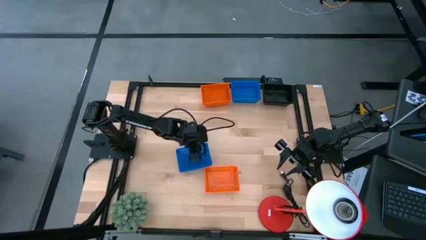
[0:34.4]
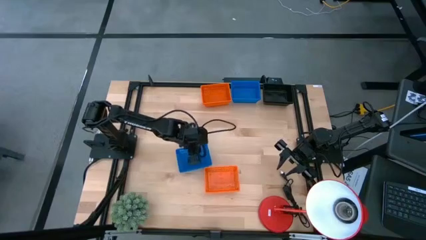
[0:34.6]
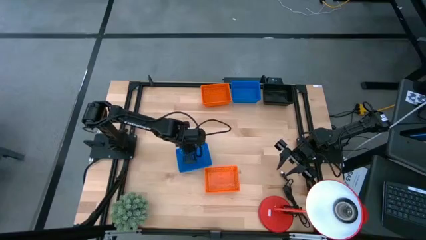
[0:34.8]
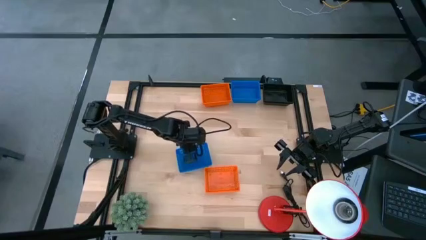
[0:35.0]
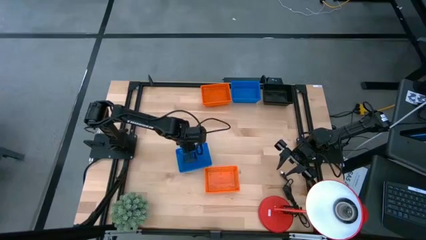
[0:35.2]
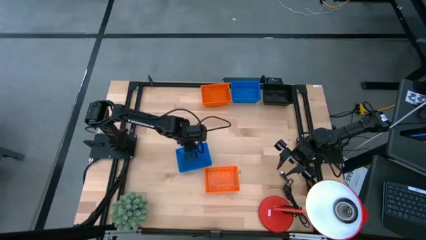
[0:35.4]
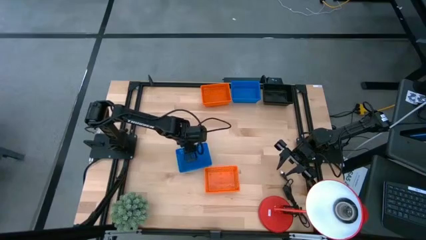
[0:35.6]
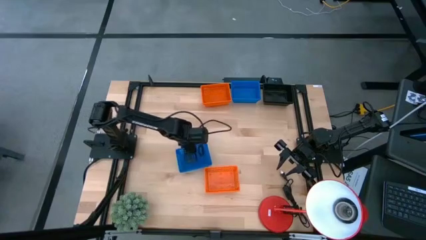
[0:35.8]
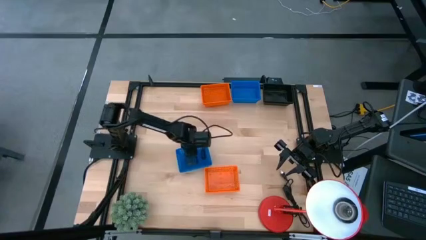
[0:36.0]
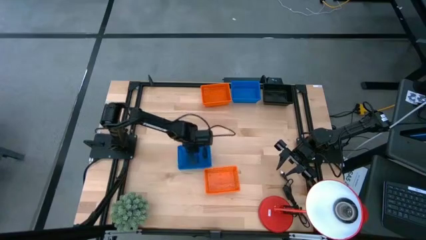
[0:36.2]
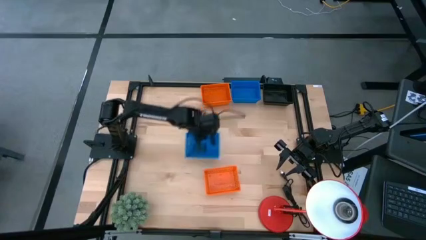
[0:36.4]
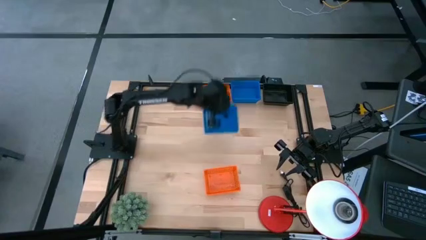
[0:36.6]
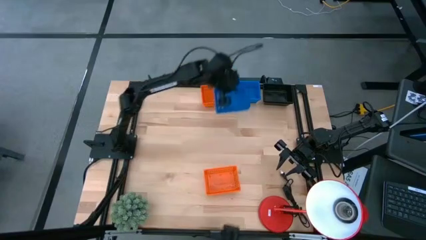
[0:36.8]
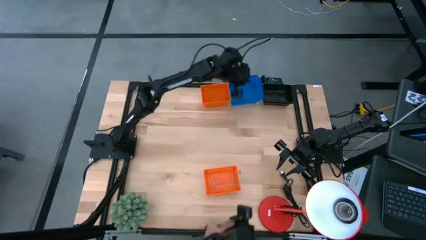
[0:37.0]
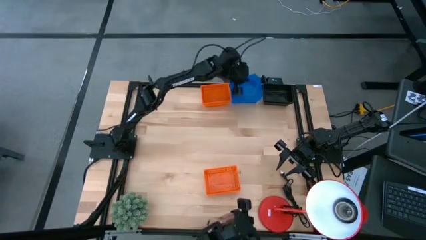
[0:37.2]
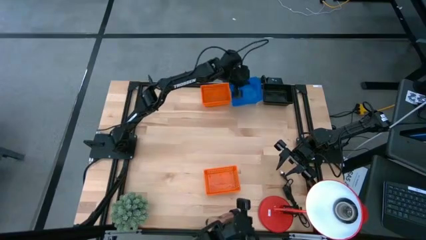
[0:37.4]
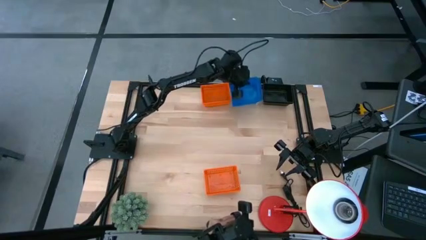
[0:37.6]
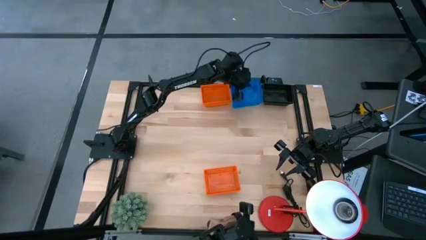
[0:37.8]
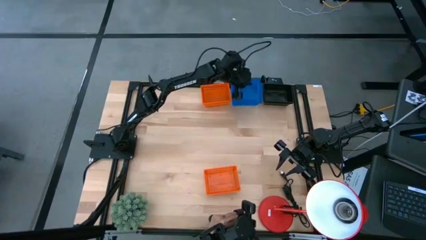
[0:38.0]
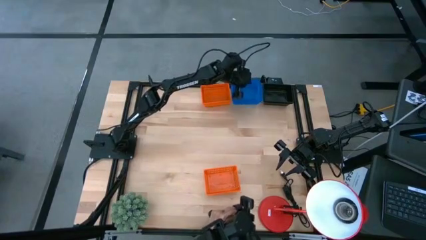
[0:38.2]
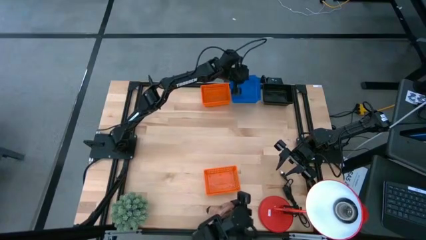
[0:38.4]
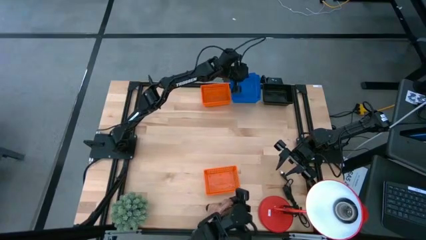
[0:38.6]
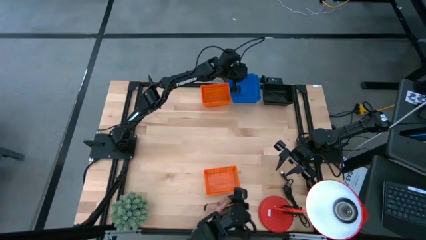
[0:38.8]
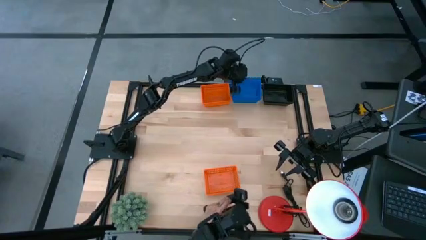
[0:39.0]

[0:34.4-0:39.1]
Stack the bottom blue bin on top of the top blue bin

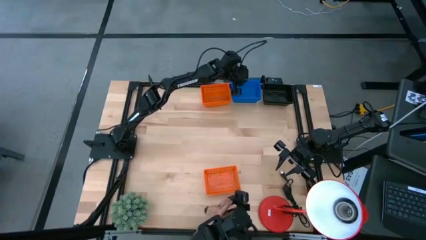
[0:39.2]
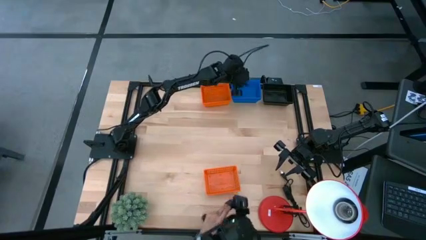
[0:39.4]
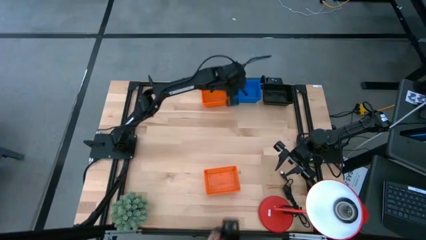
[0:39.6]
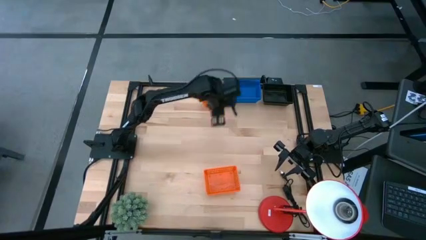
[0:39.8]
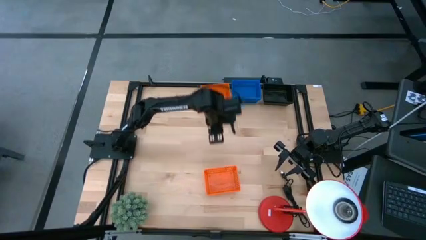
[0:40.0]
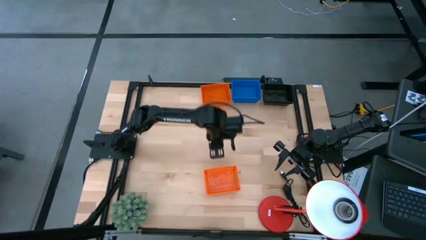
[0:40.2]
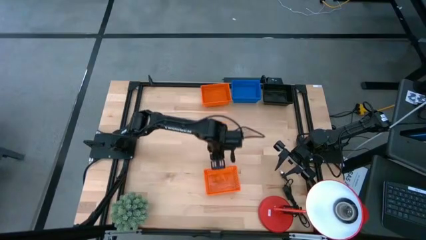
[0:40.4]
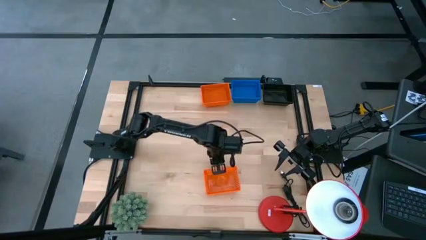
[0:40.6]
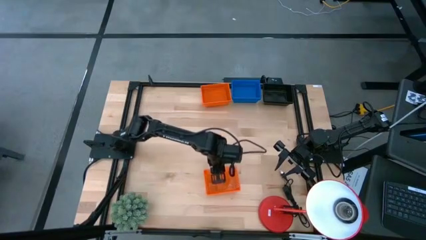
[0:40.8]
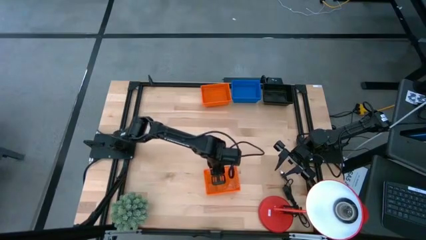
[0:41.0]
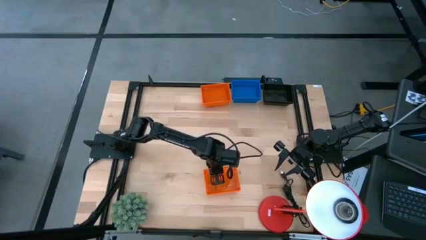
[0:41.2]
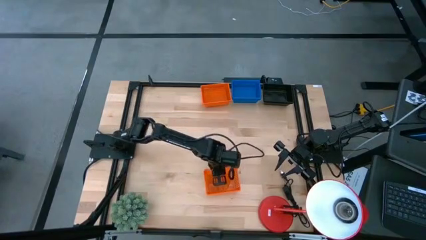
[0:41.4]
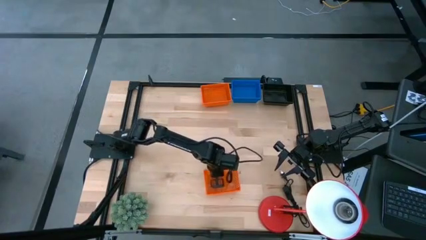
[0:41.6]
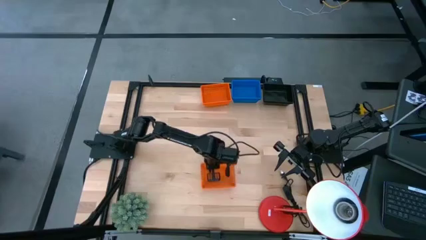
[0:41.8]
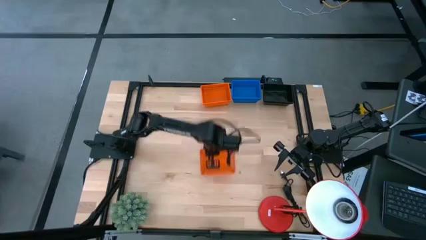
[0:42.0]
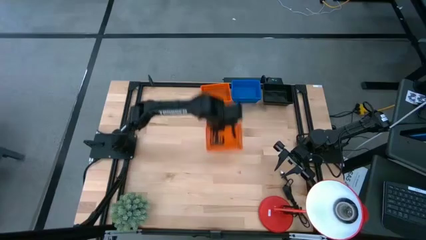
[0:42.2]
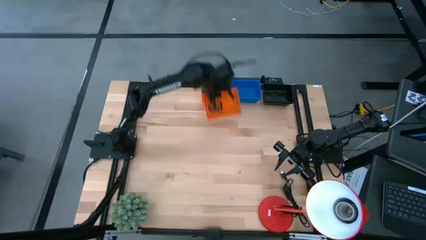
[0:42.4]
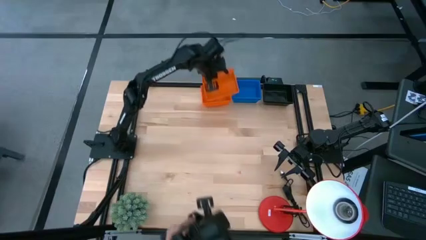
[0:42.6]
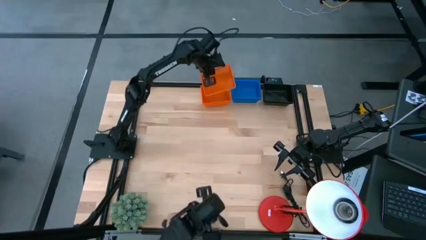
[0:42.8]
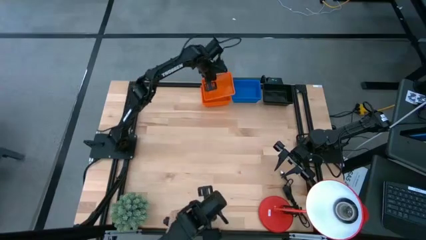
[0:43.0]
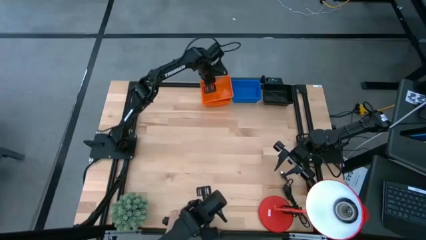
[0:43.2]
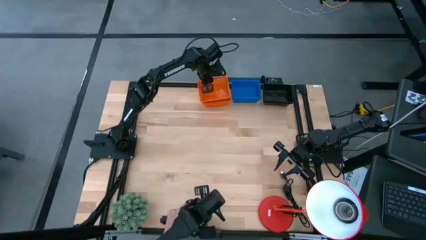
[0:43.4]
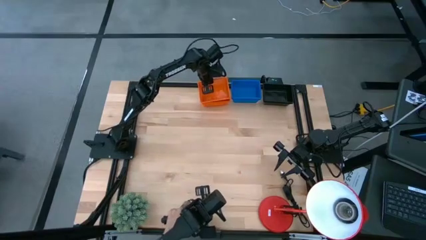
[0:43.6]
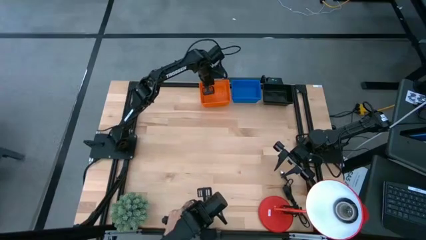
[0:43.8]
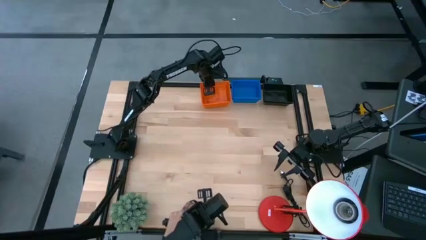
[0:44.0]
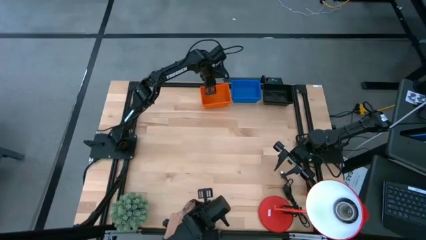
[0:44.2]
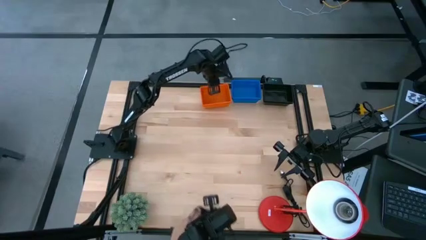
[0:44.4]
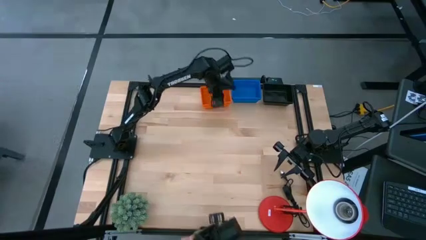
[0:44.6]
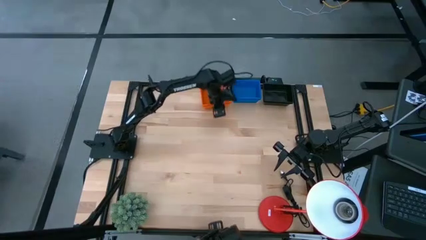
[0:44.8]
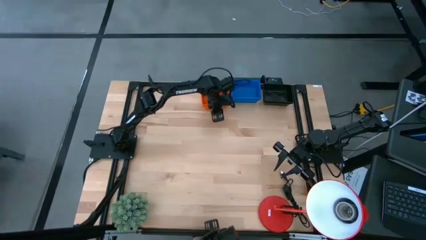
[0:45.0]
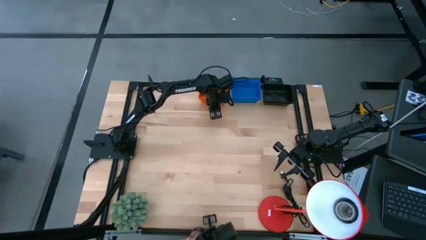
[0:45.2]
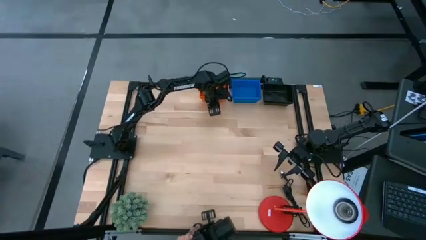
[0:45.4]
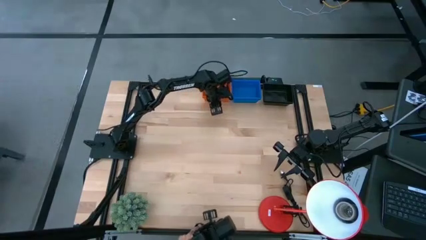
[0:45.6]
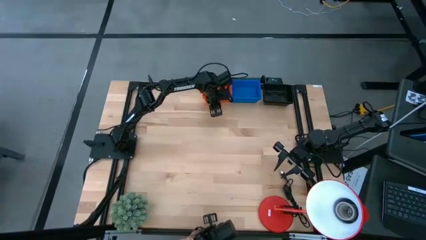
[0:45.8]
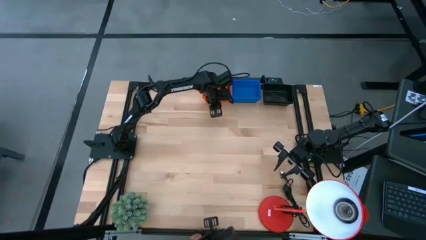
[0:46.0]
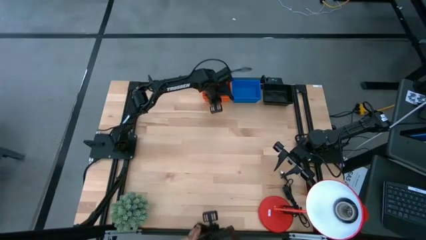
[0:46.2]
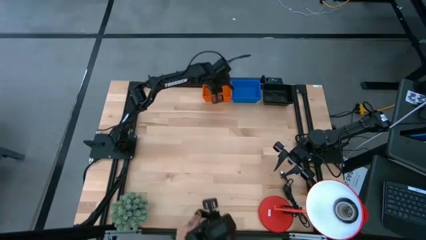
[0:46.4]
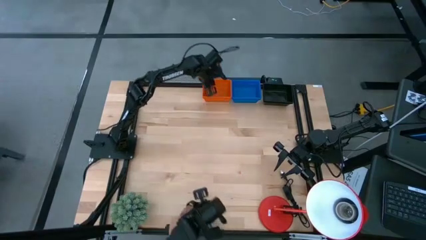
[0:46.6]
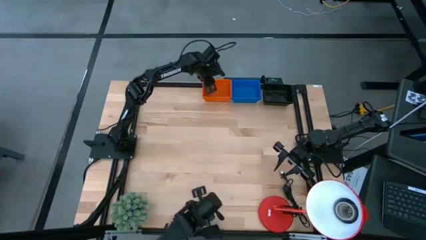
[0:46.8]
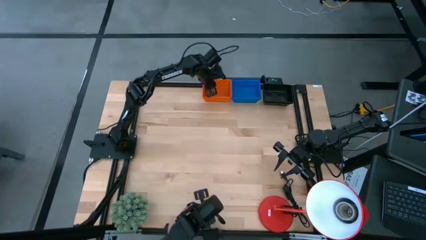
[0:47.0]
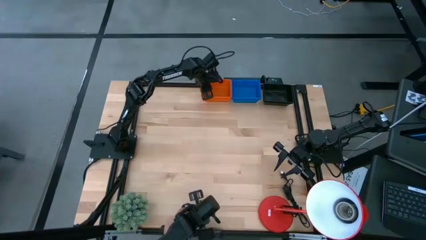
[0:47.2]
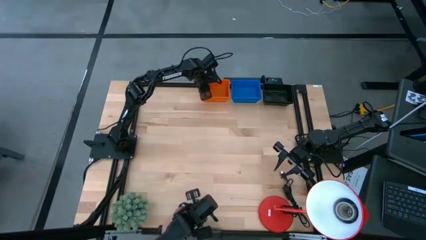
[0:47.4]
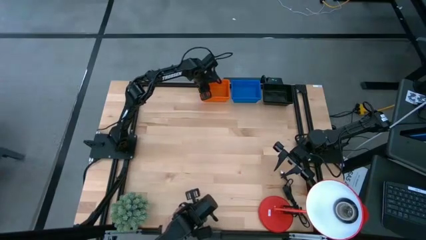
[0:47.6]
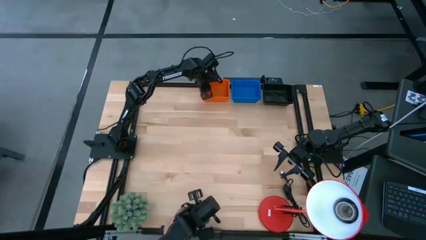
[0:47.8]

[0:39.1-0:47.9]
Stack the bottom orange bin on top of the top orange bin
